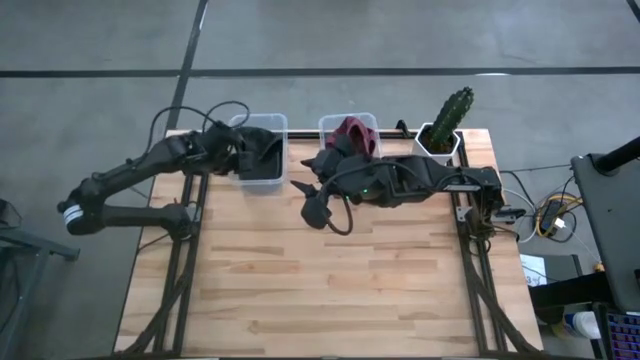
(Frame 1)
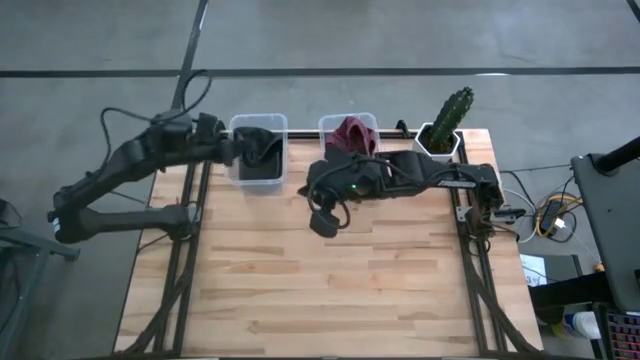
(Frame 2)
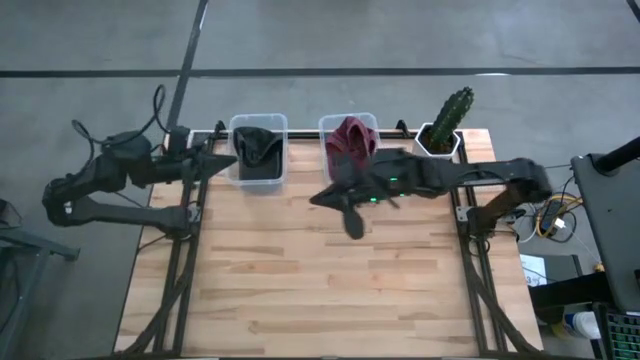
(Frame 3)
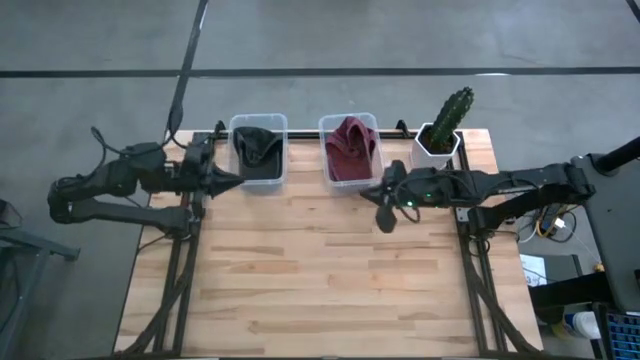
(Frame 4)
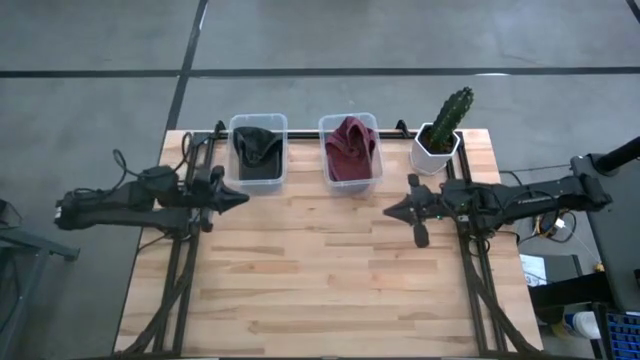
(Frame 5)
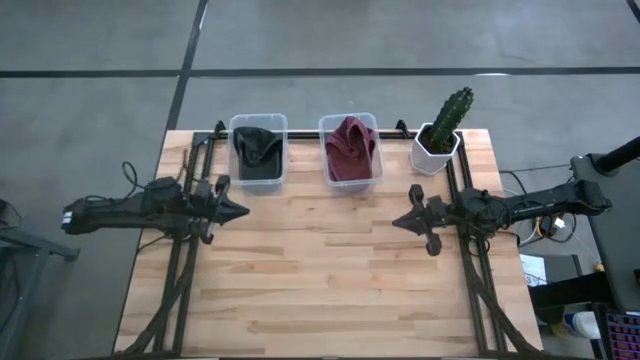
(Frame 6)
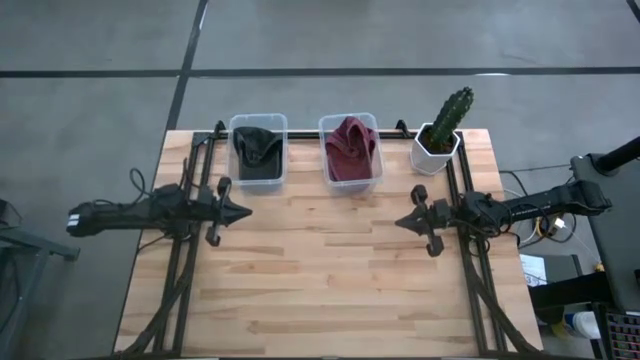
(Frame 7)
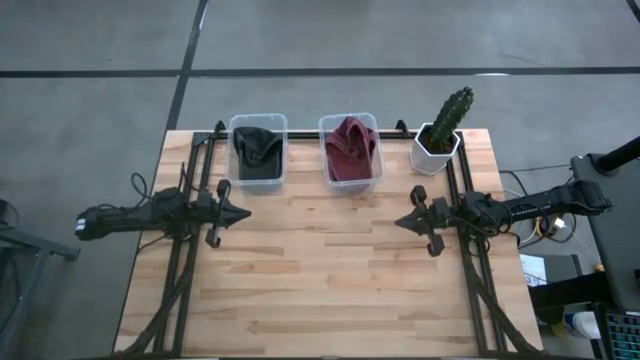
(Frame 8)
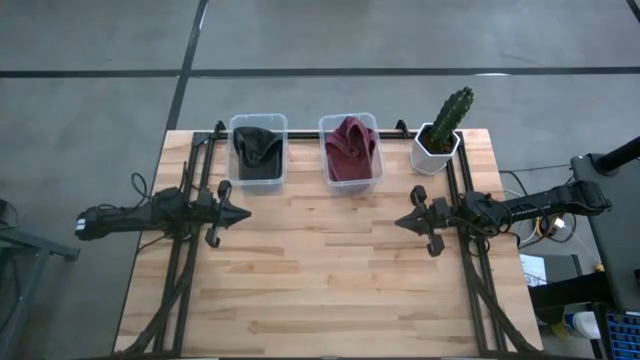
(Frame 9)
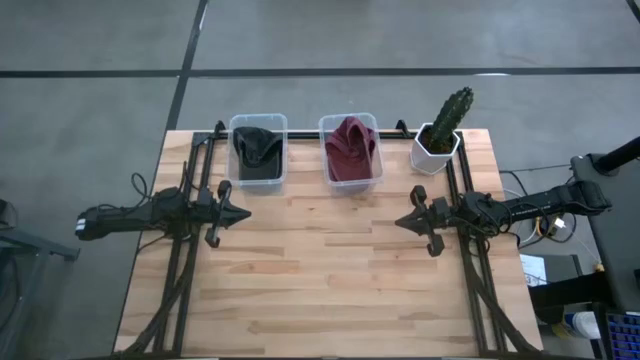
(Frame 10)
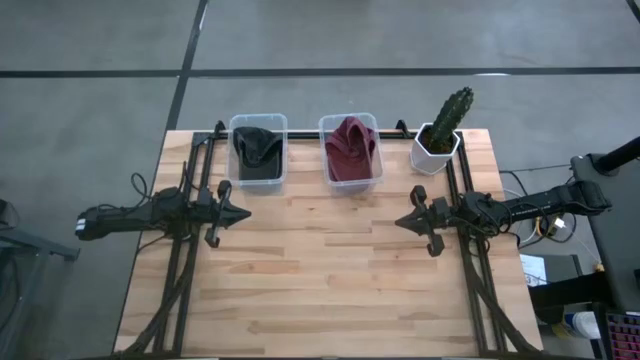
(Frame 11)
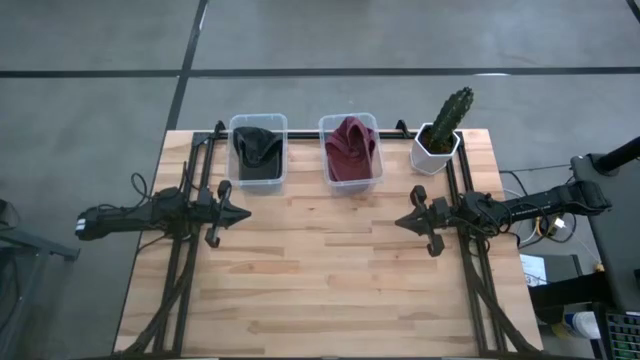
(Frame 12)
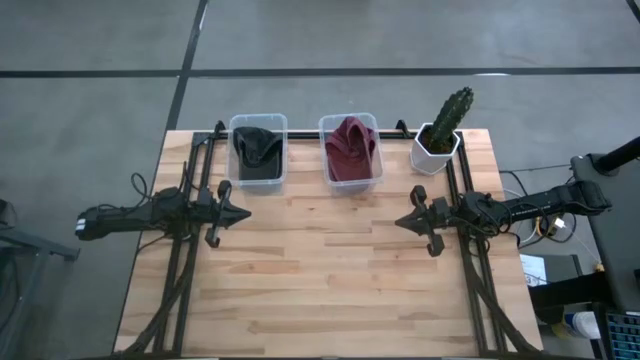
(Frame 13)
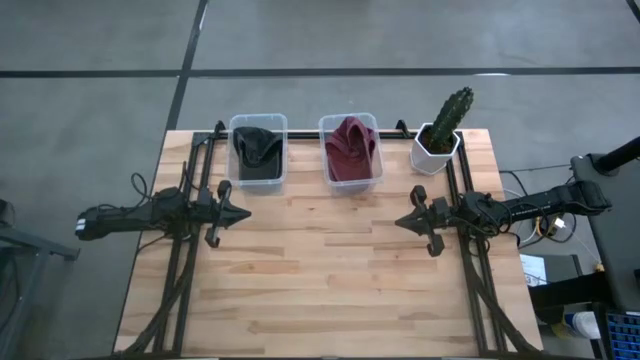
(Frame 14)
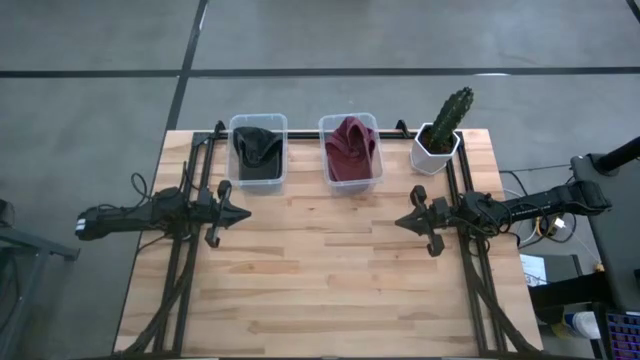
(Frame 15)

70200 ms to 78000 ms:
Task: Pick & Place hat
Return to Home Position

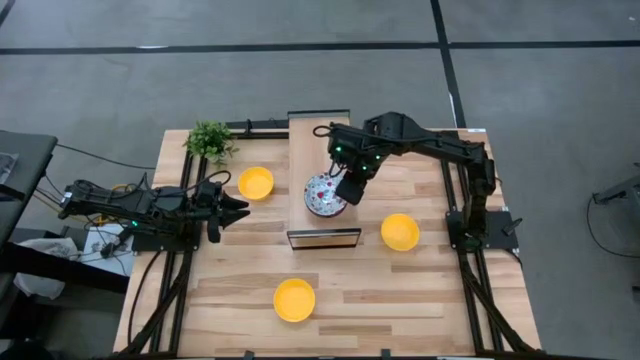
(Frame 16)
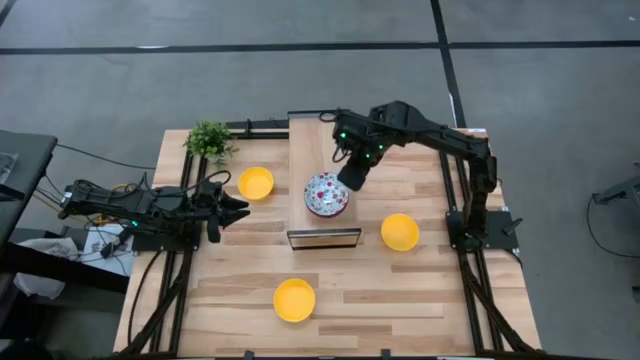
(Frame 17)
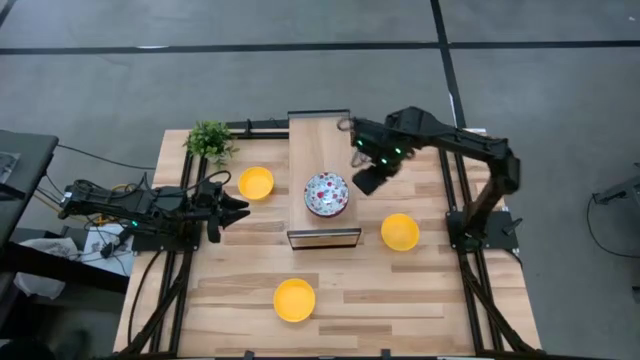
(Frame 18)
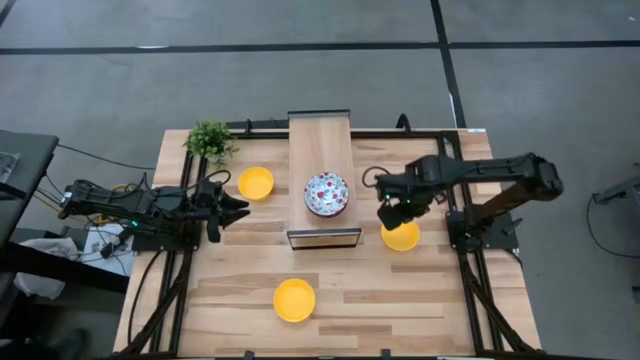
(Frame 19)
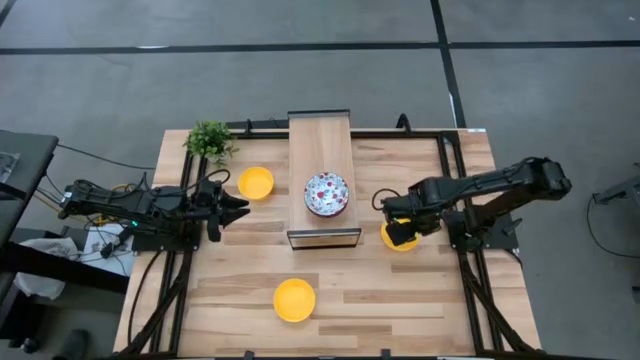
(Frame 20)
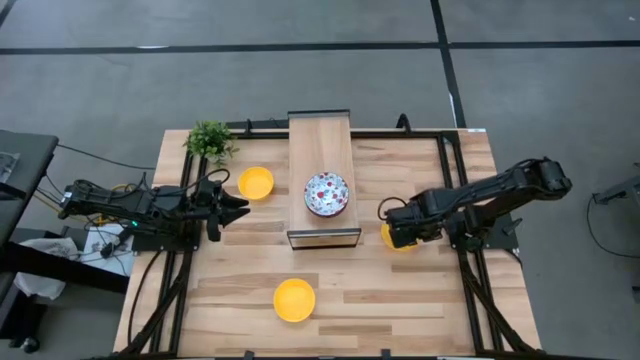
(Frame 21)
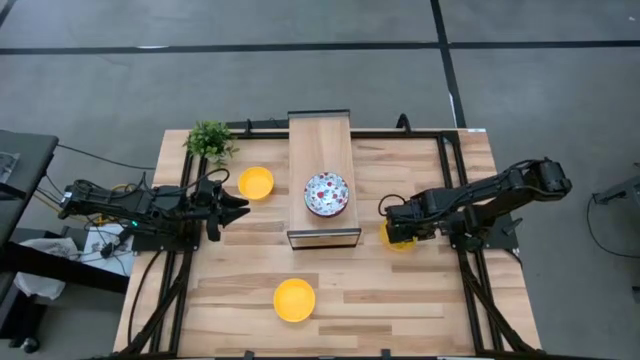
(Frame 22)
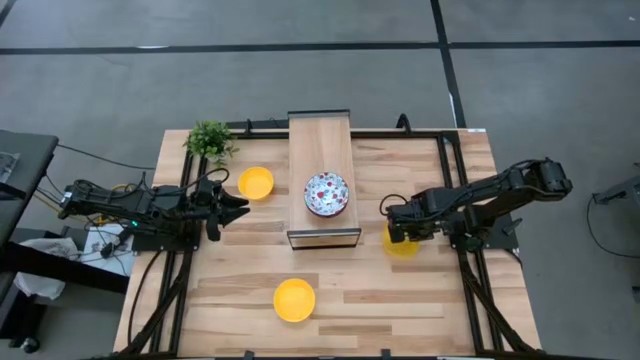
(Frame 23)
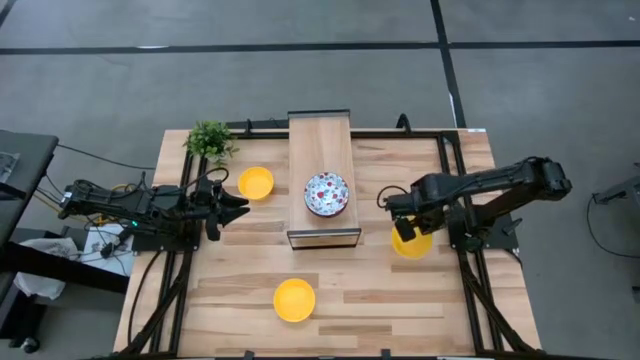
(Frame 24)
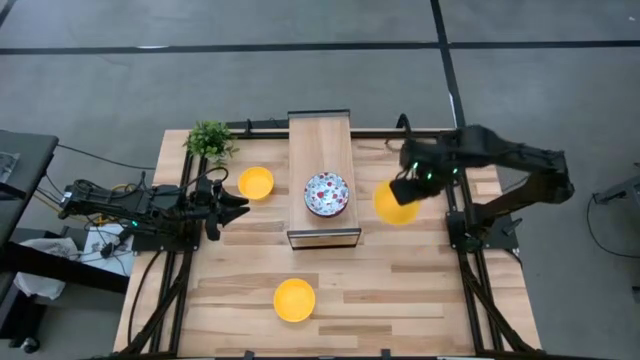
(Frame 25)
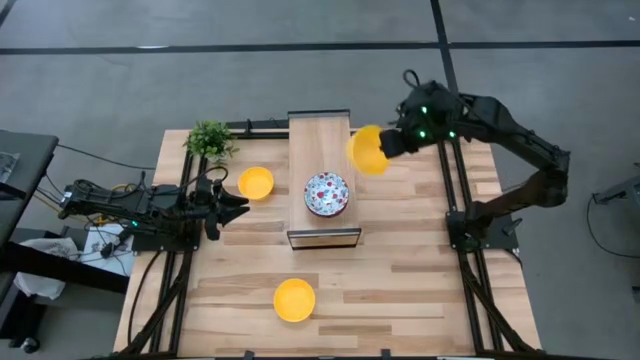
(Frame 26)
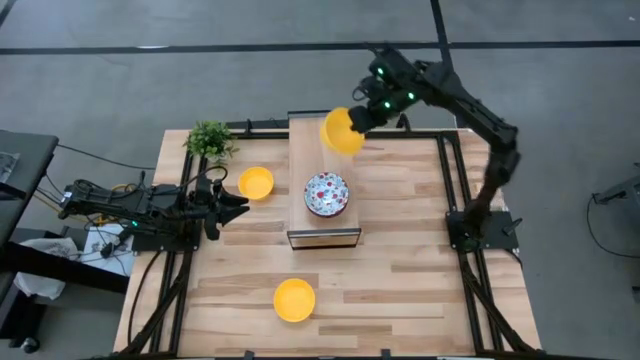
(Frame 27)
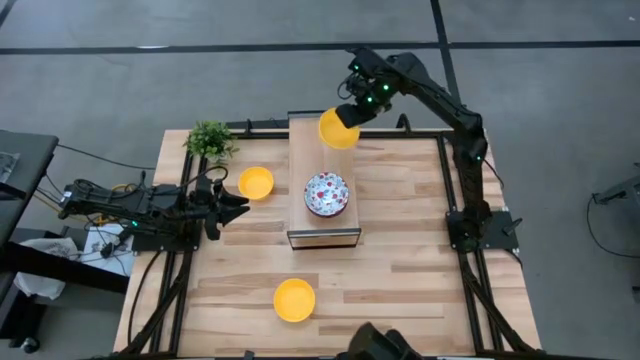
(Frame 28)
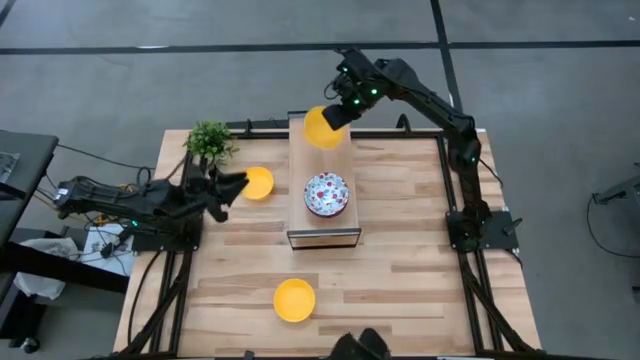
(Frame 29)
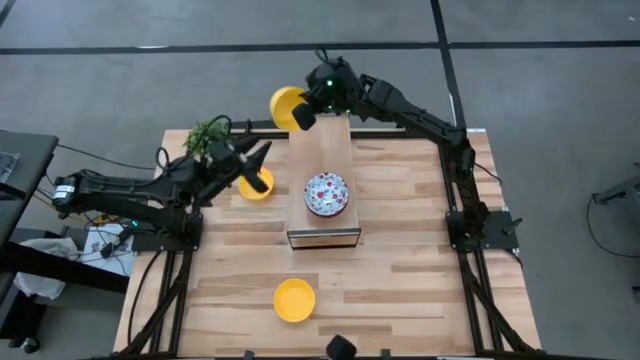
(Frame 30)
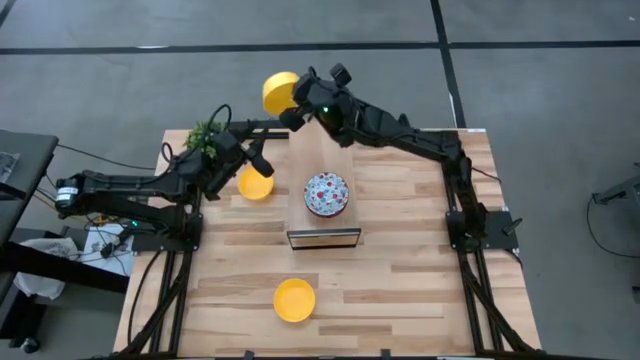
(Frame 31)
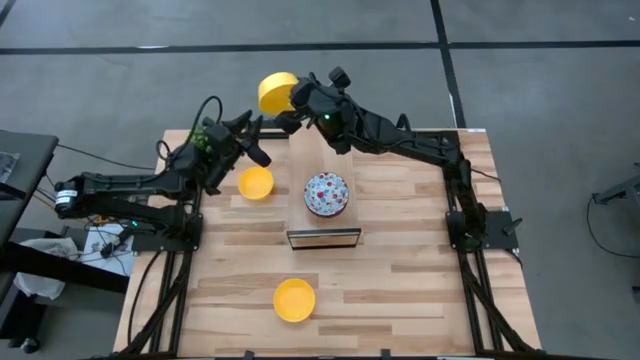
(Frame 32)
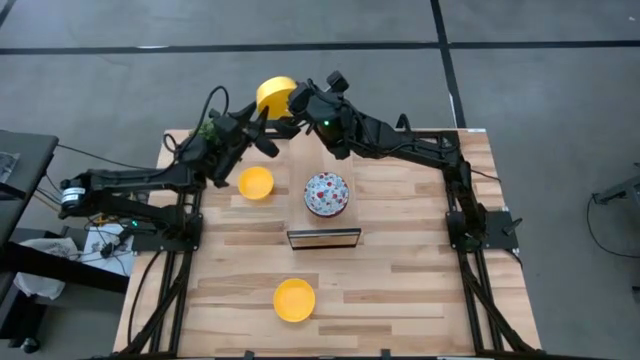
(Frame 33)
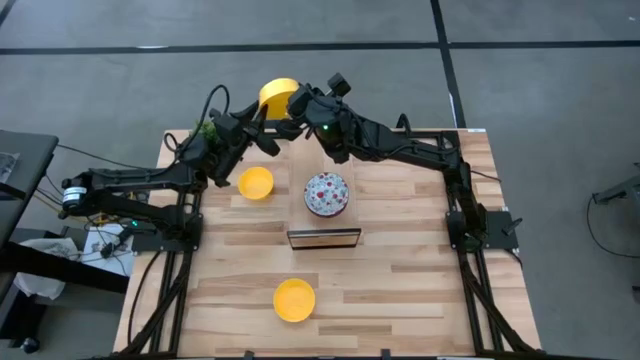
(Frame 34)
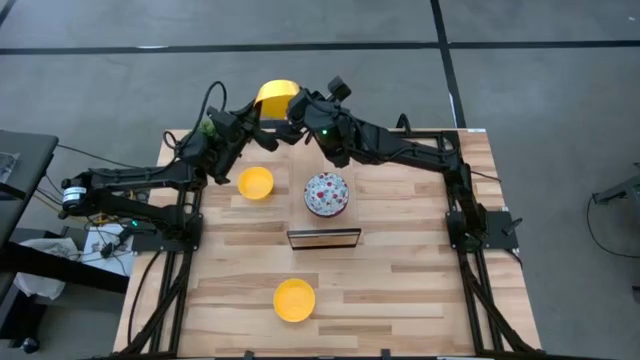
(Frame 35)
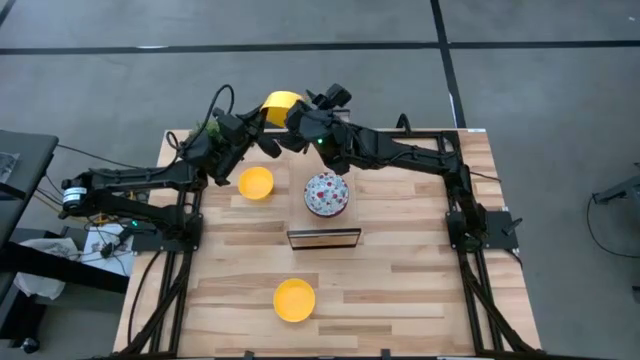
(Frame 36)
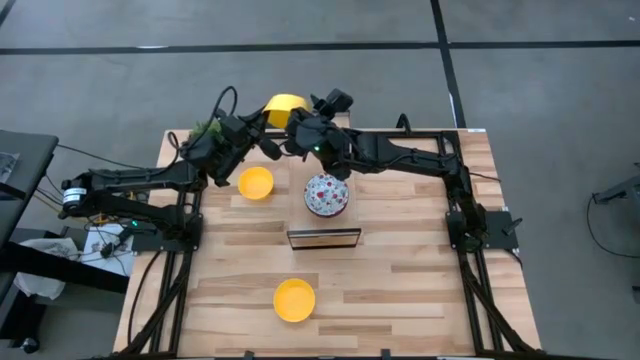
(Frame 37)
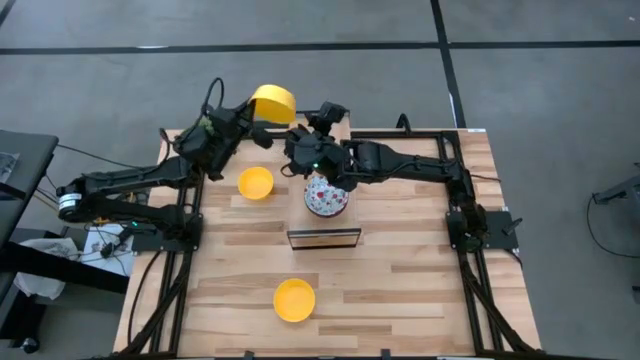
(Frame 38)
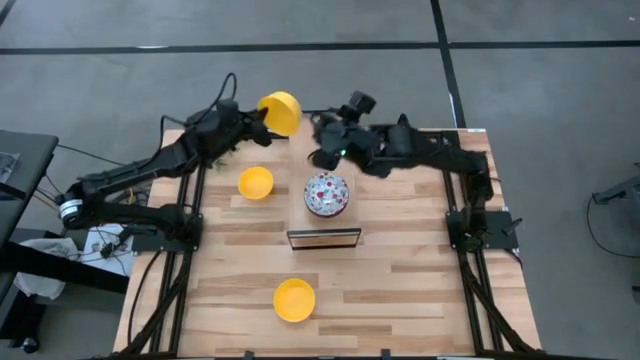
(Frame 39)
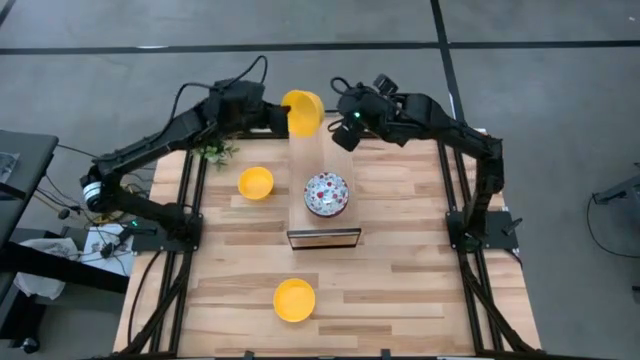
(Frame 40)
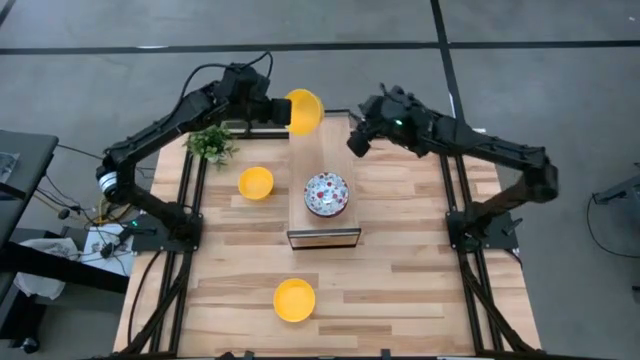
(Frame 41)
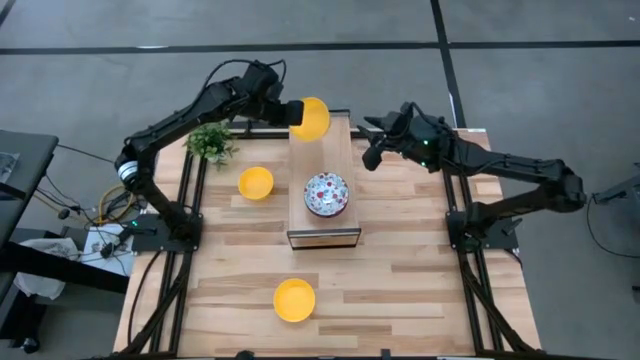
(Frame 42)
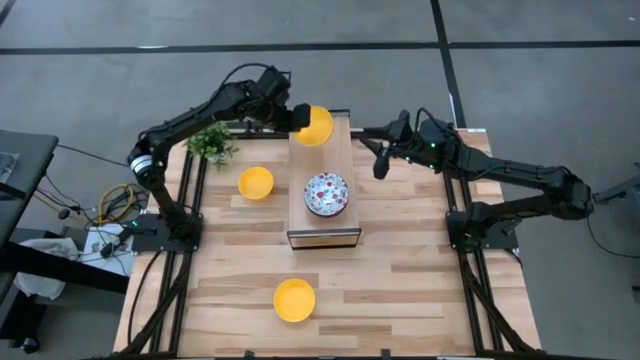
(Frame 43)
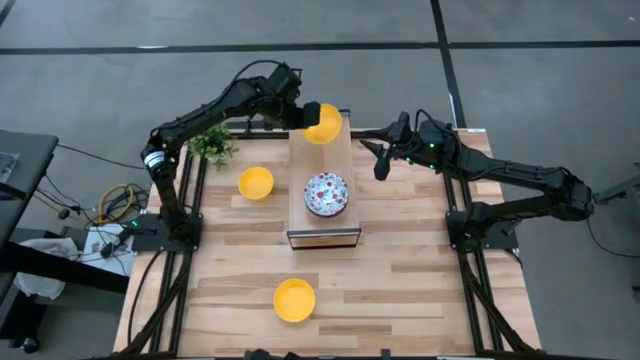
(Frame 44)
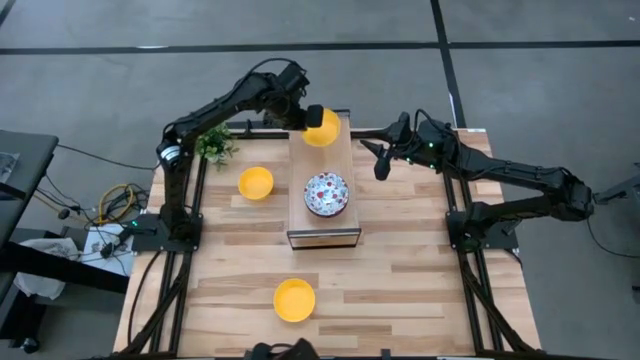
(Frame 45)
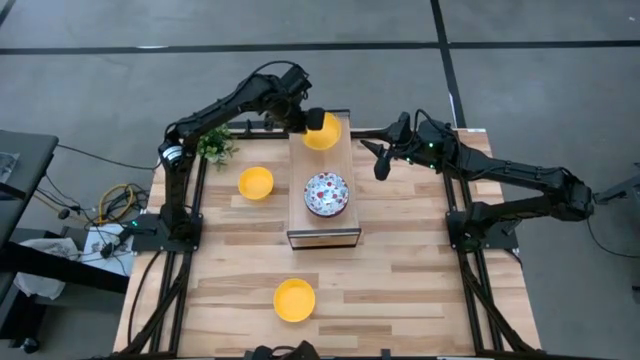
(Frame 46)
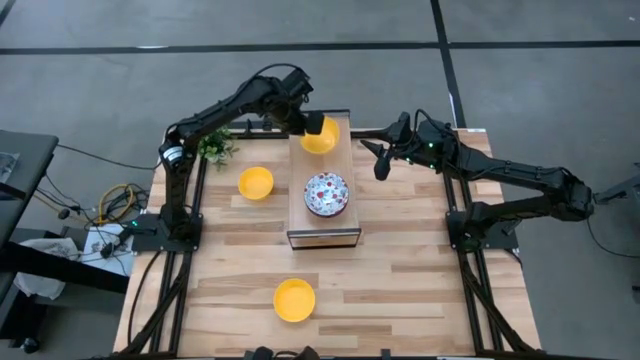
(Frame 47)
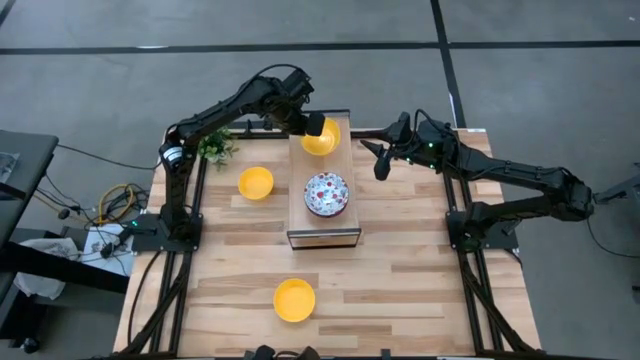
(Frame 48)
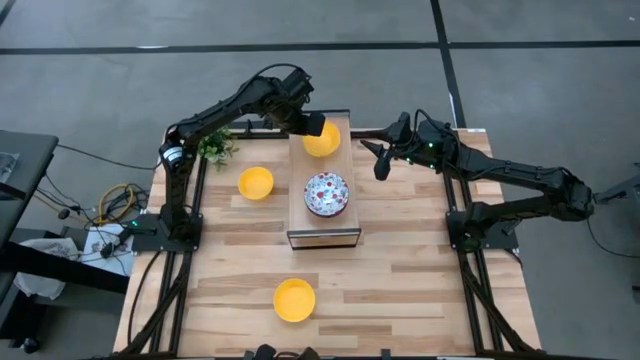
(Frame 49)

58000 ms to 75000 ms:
Task: Pick & Place Mini bowls
Put the middle yellow bowl on the shelf
